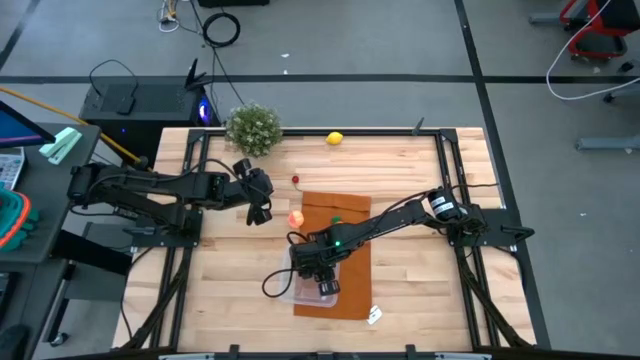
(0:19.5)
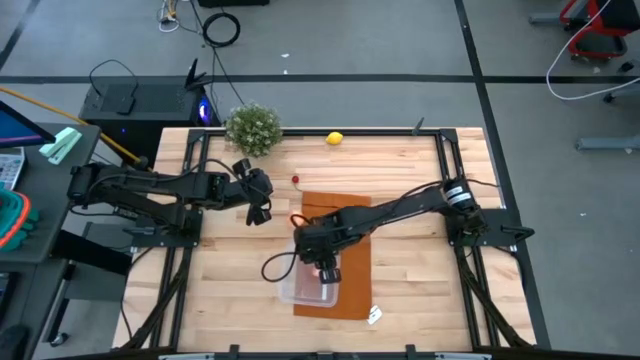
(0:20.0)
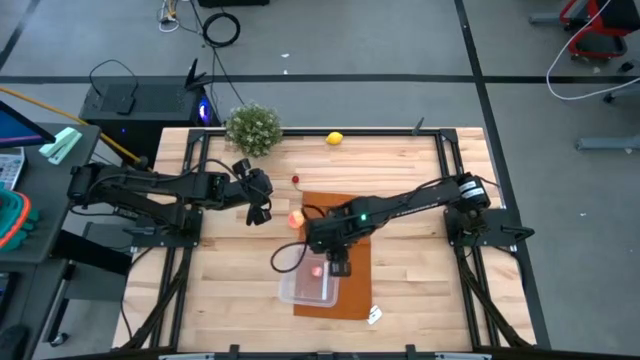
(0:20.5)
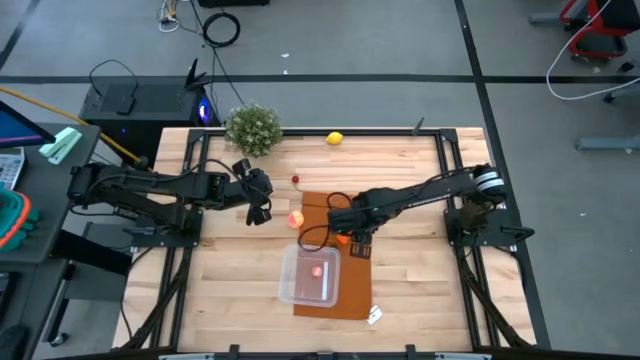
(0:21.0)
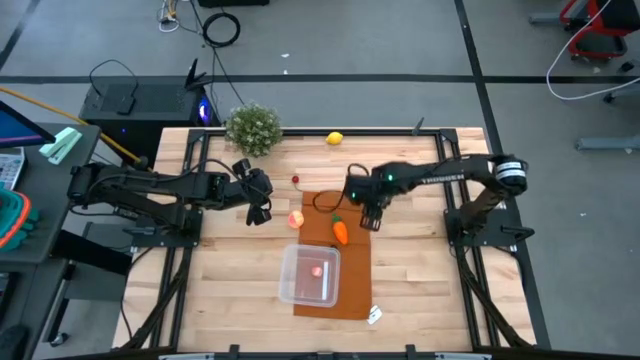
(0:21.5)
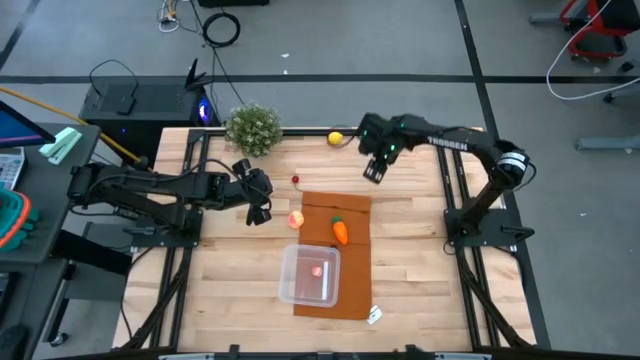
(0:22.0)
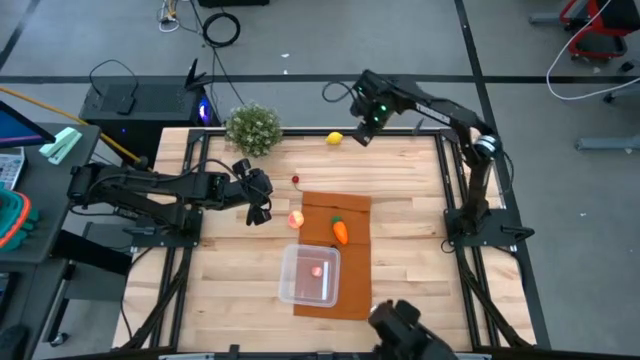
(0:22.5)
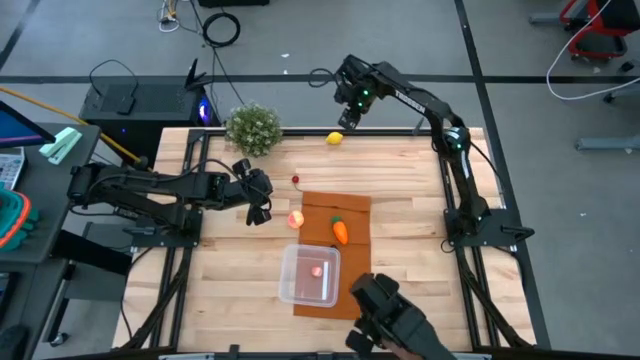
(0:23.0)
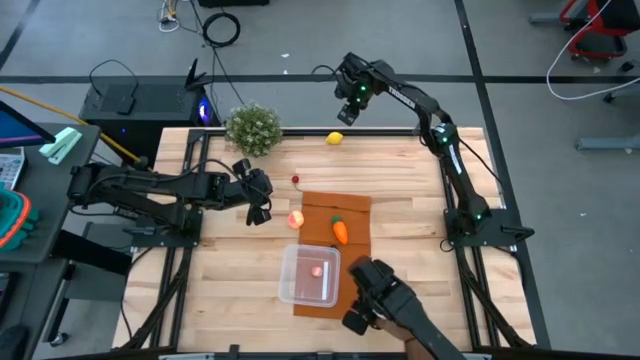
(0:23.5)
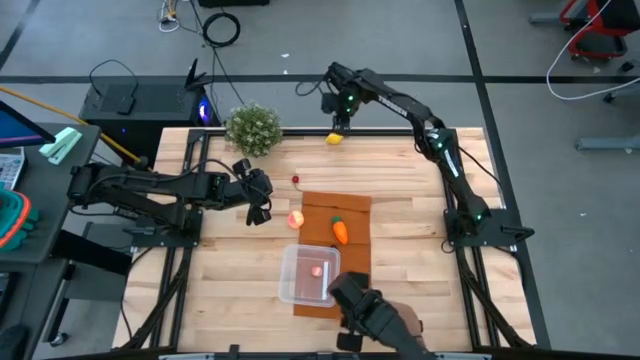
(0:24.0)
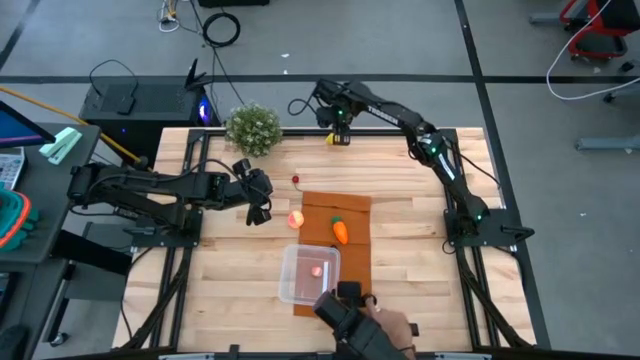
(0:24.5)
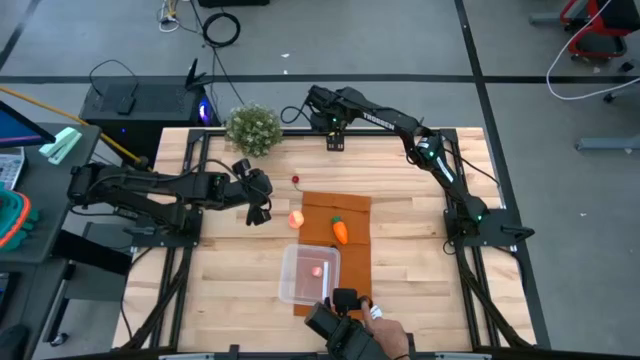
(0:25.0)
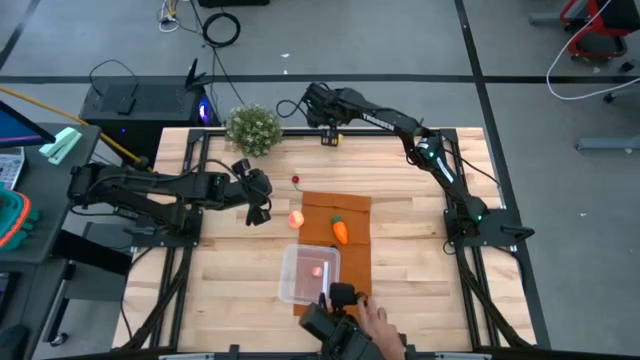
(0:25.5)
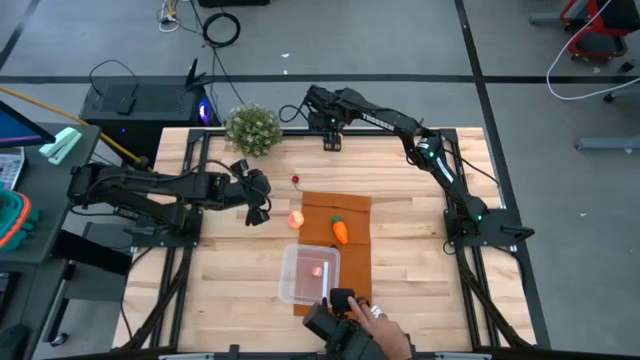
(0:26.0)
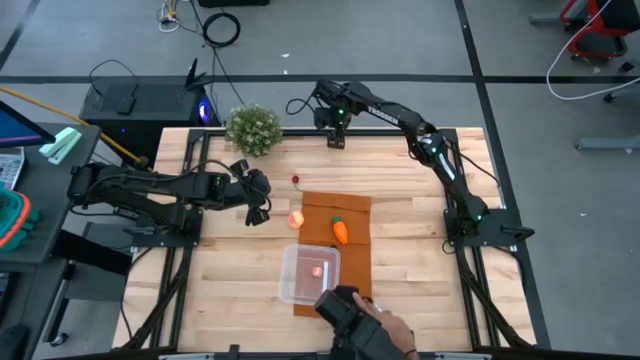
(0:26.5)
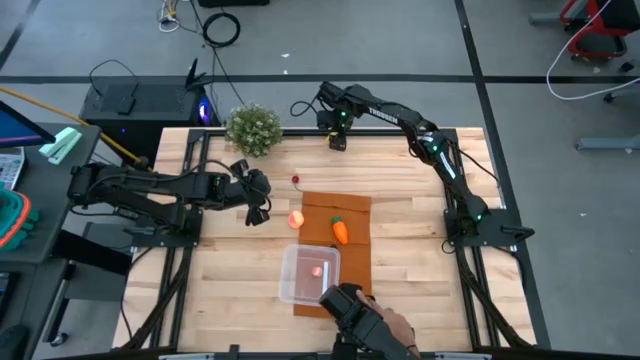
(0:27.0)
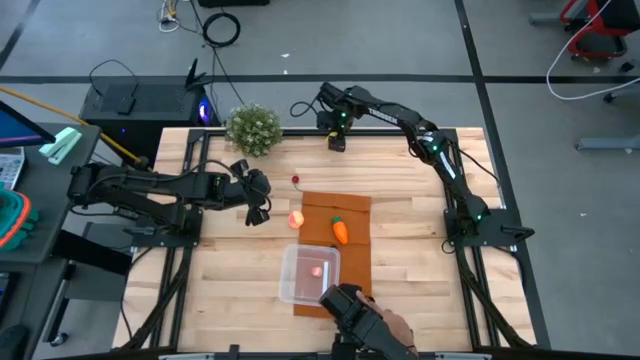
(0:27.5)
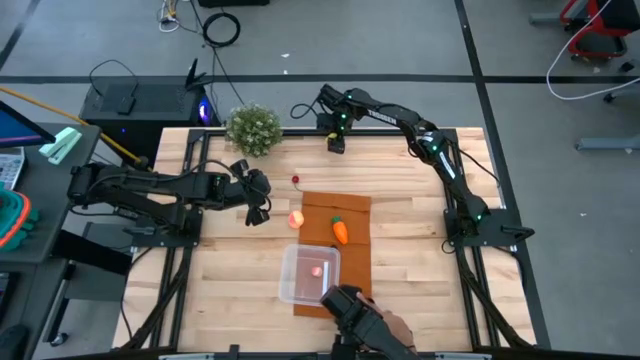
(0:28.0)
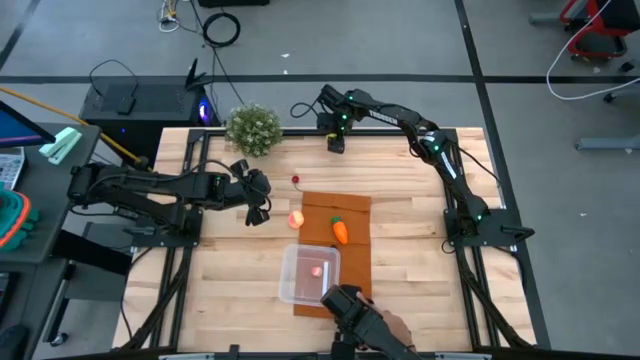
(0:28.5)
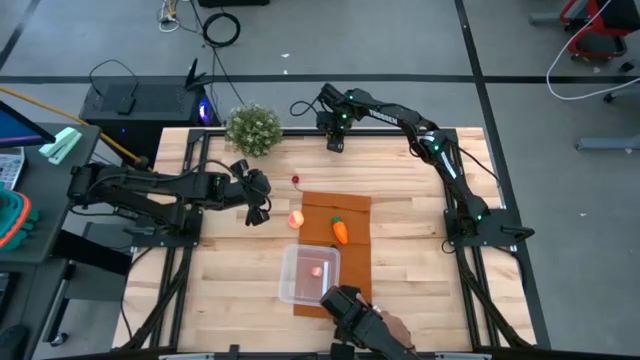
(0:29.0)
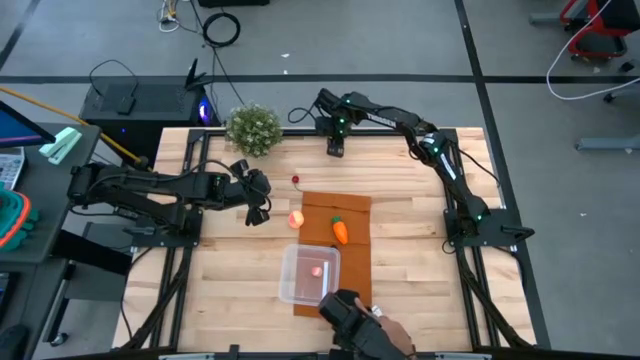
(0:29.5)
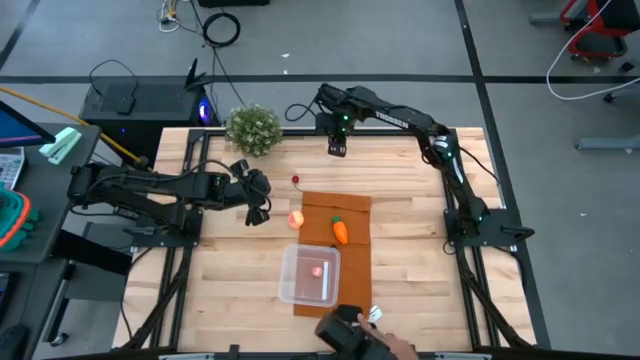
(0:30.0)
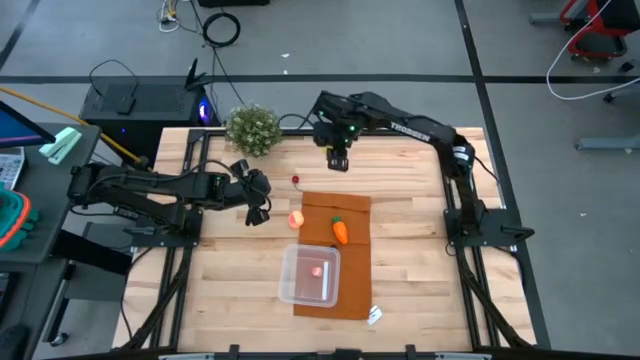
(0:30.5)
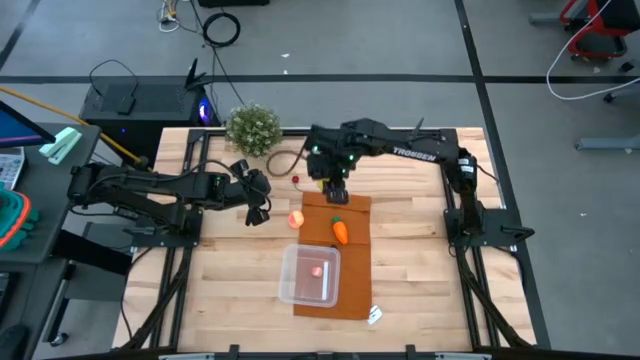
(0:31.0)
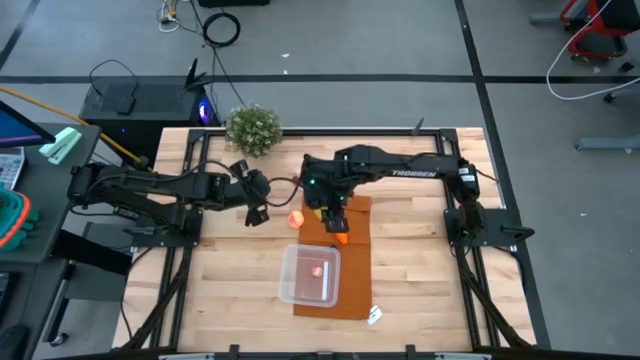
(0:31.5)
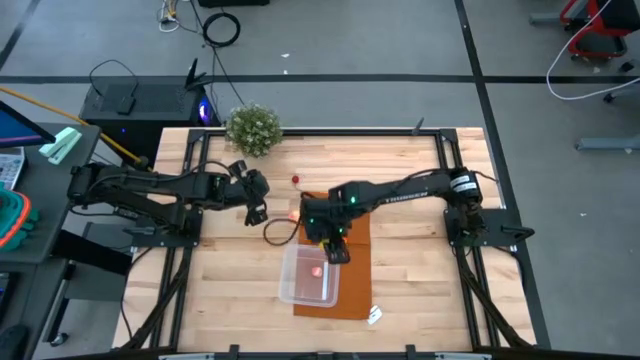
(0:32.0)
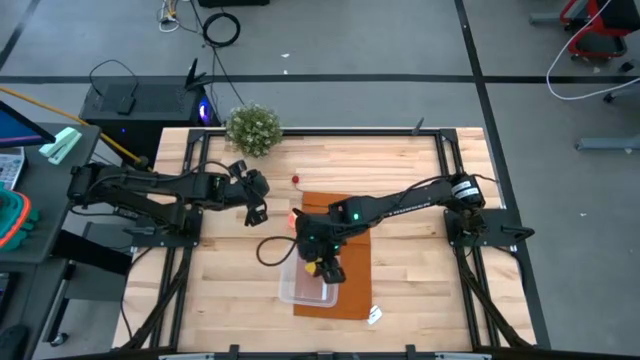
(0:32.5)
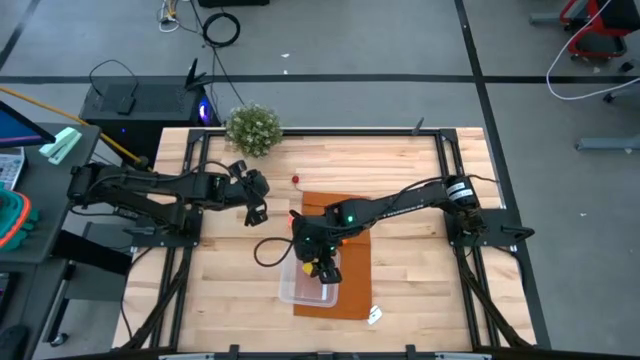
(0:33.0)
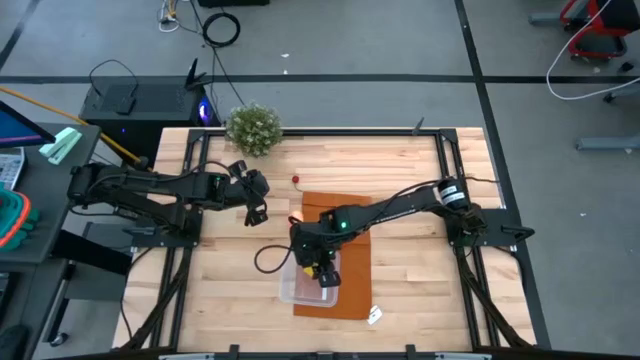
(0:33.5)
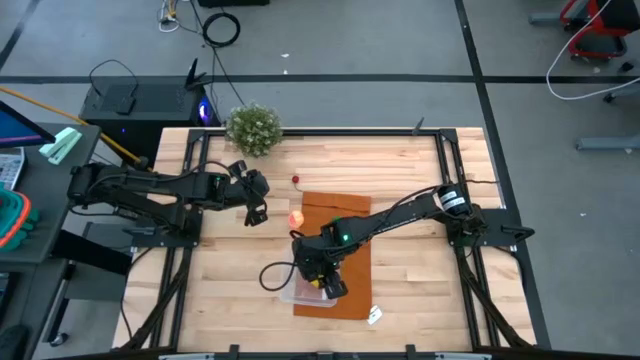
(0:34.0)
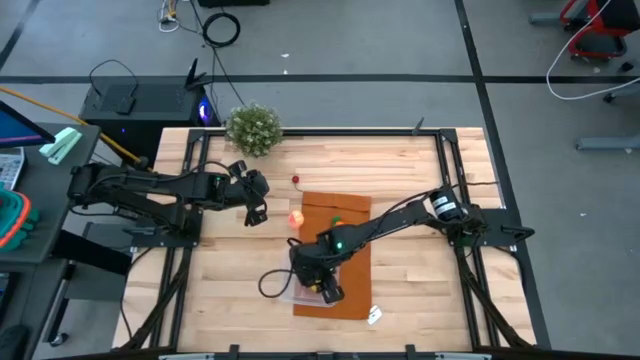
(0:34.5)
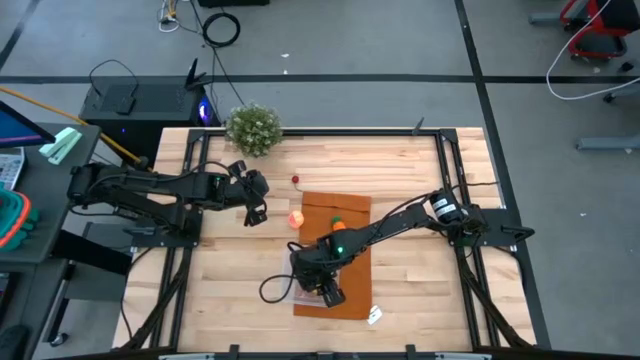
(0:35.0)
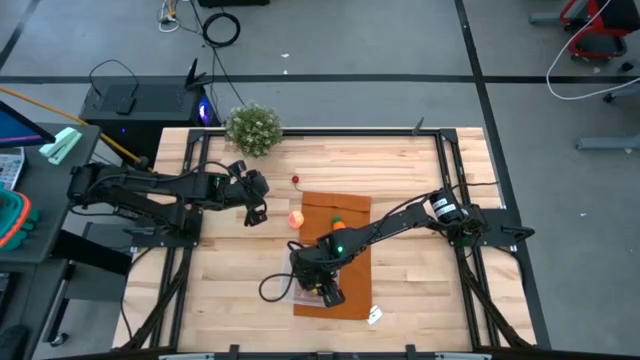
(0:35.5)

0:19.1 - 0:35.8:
Task: Pick and placing Produce into tupperware
Put the yellow lemon into the transparent bin

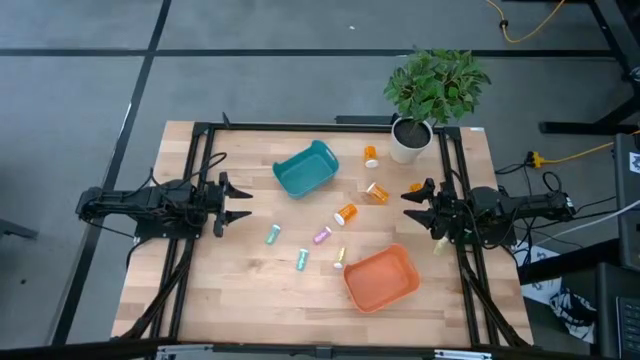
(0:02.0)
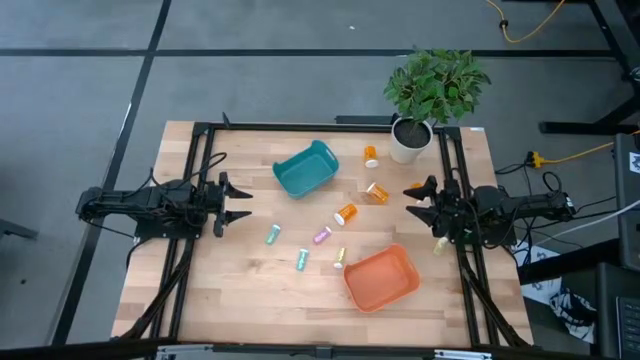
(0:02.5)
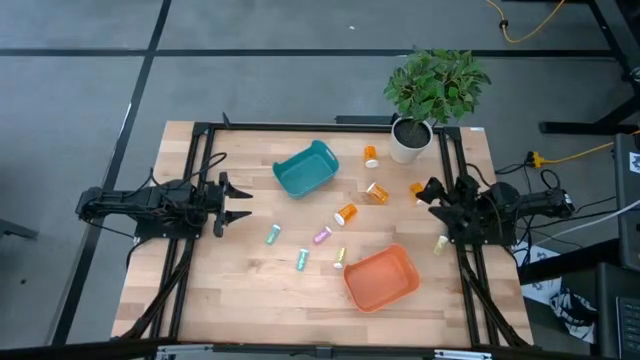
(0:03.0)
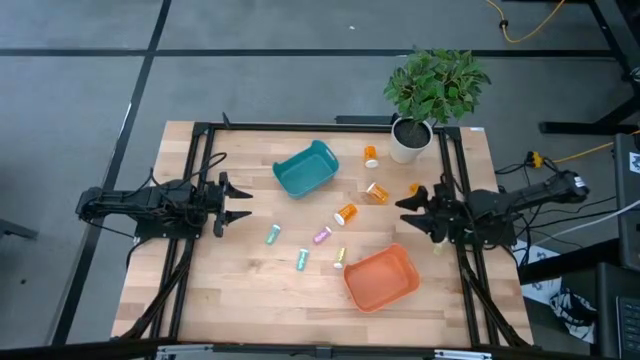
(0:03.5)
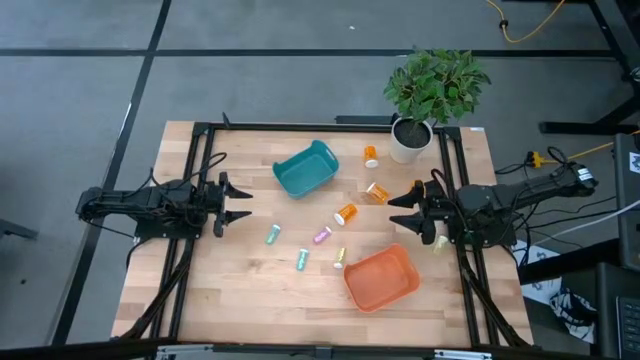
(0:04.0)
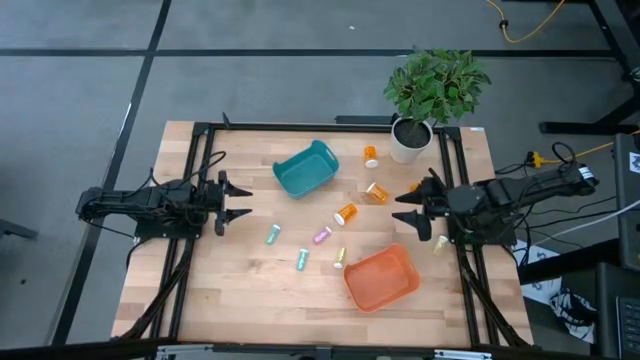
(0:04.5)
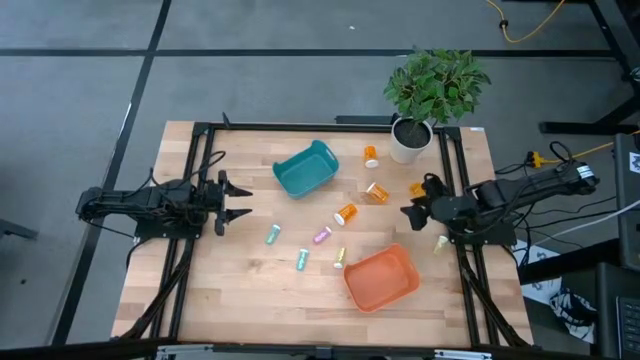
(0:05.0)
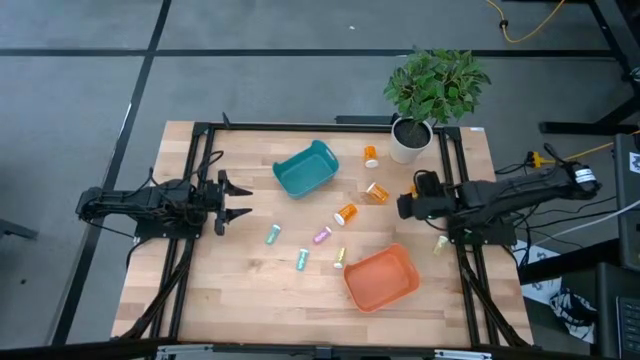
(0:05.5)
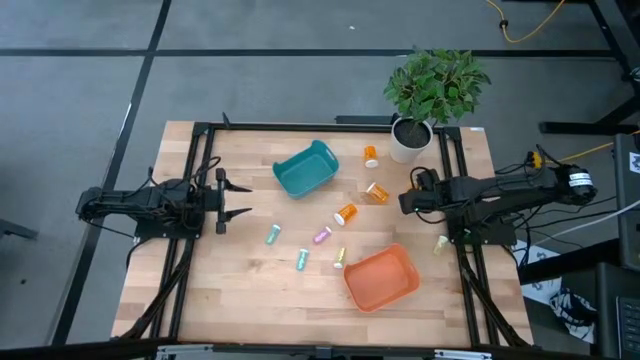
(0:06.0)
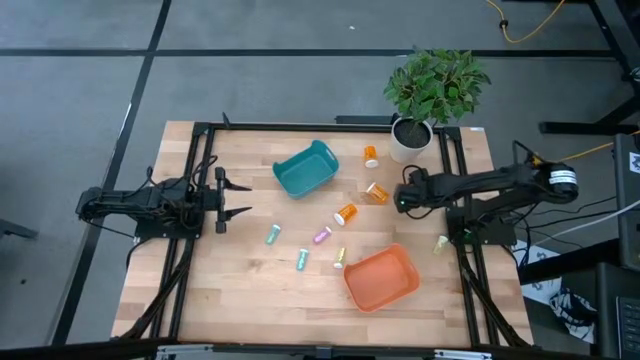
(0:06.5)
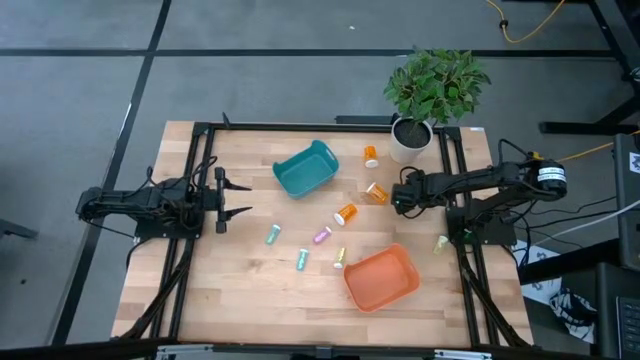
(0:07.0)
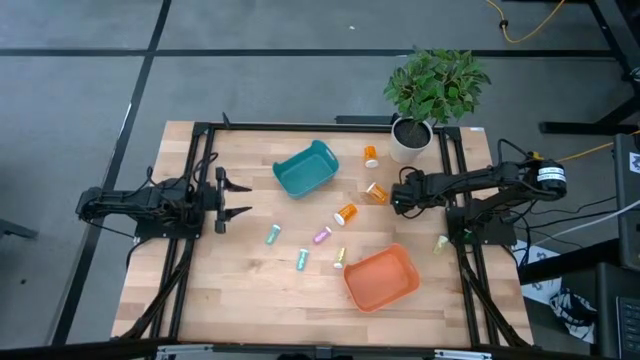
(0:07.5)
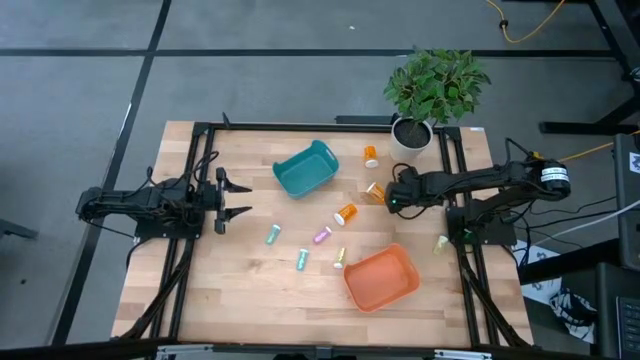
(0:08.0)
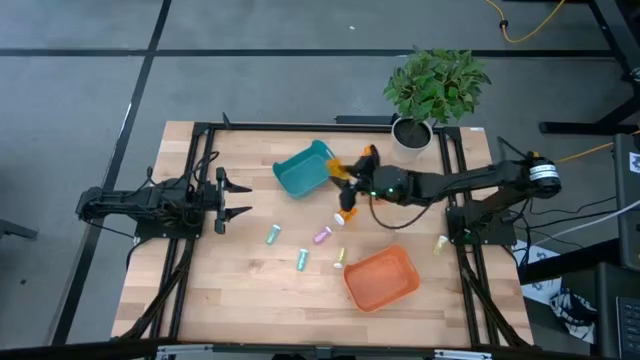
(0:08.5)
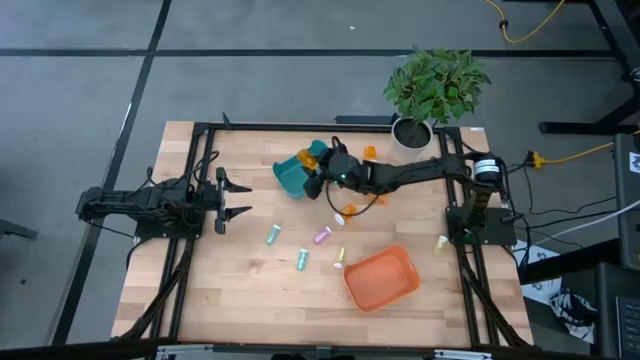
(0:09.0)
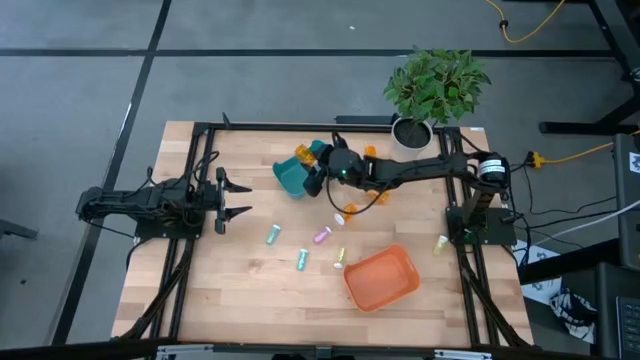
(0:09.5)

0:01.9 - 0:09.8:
Task: Pick and place medicine bottles into bin by pill shape (circle, oval)
Put the bottom right big orange pill bottle into the light blue bin
